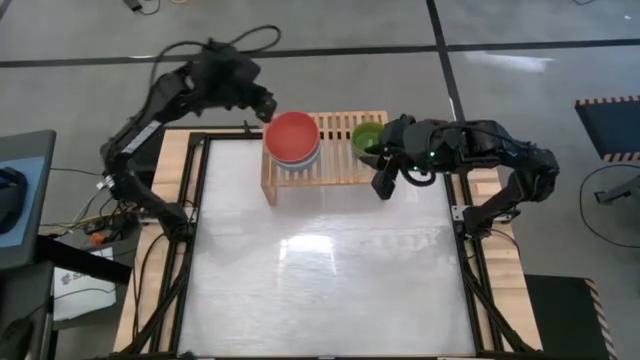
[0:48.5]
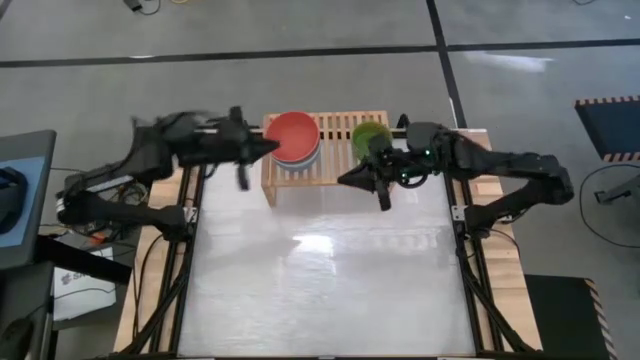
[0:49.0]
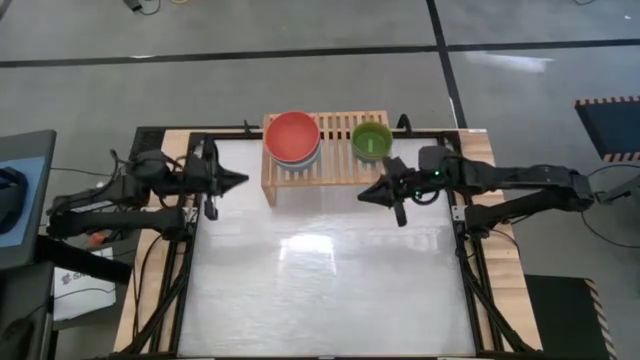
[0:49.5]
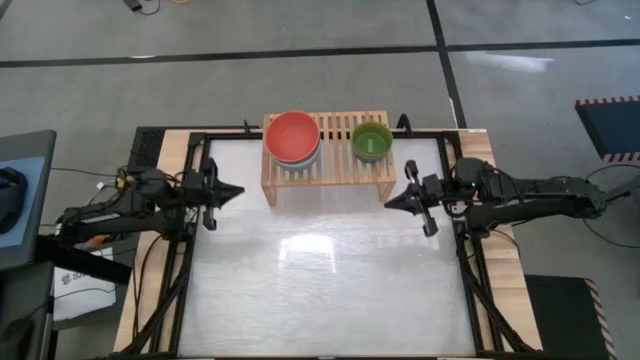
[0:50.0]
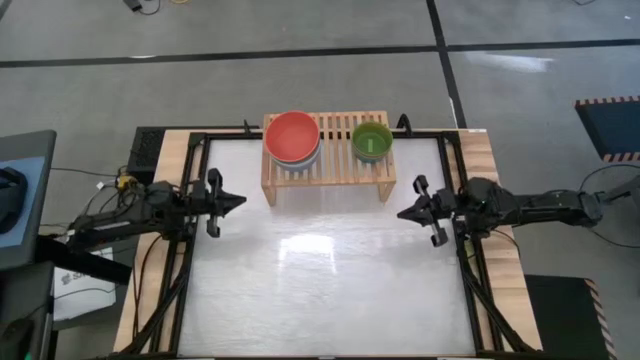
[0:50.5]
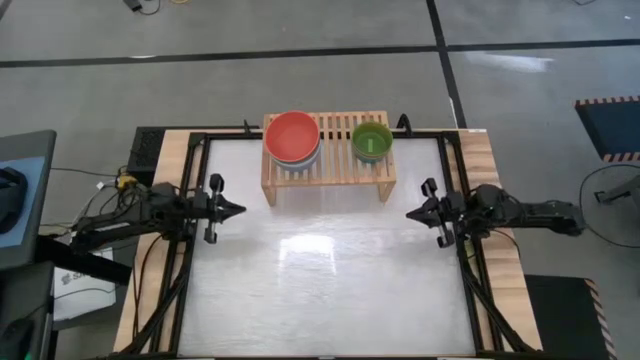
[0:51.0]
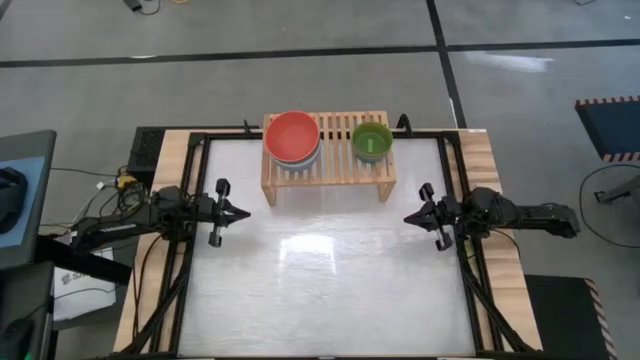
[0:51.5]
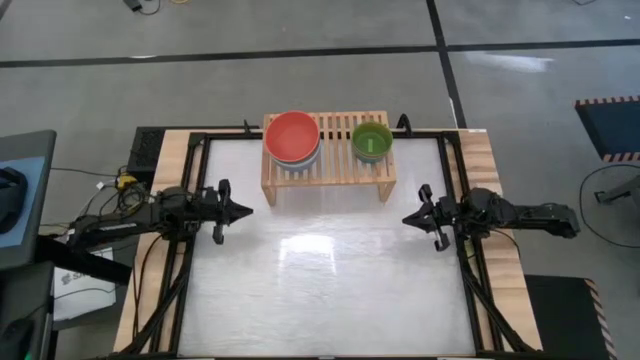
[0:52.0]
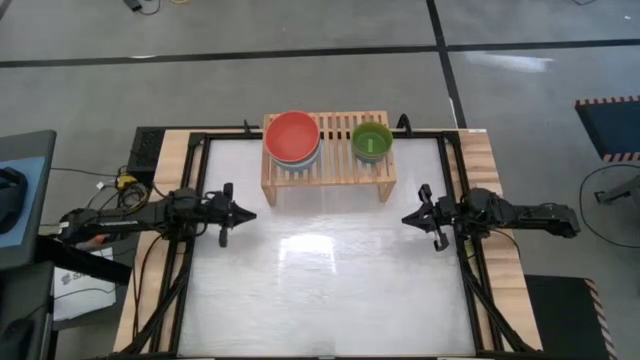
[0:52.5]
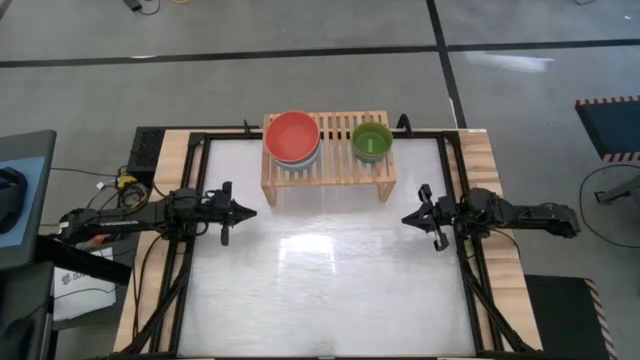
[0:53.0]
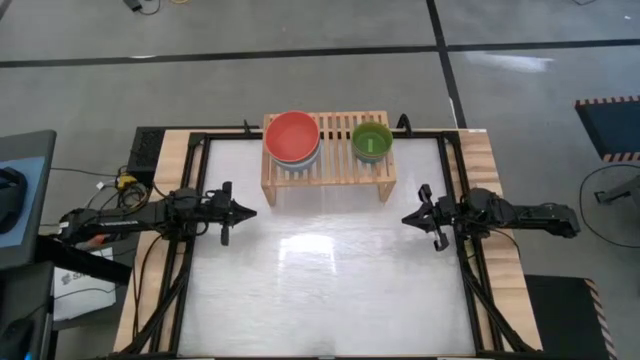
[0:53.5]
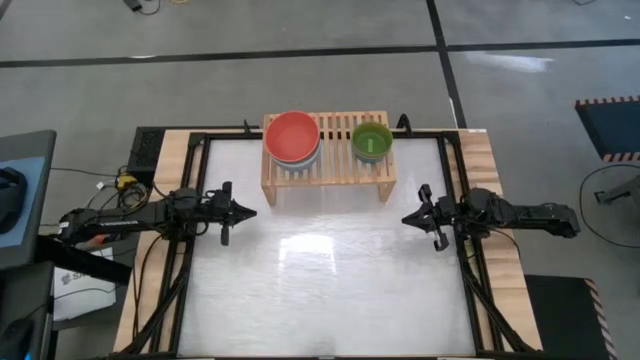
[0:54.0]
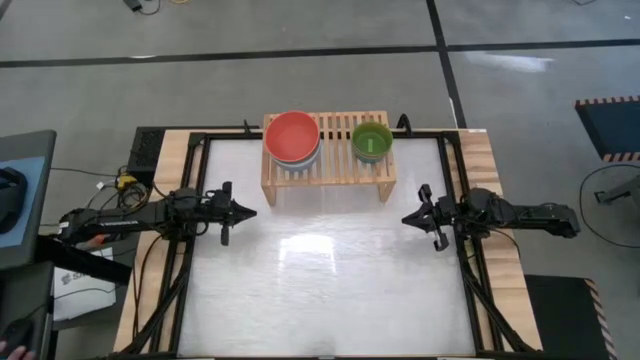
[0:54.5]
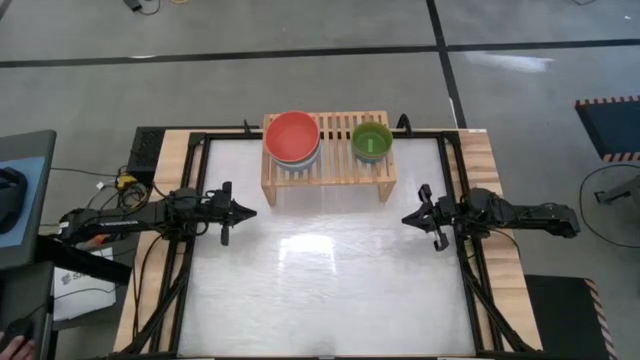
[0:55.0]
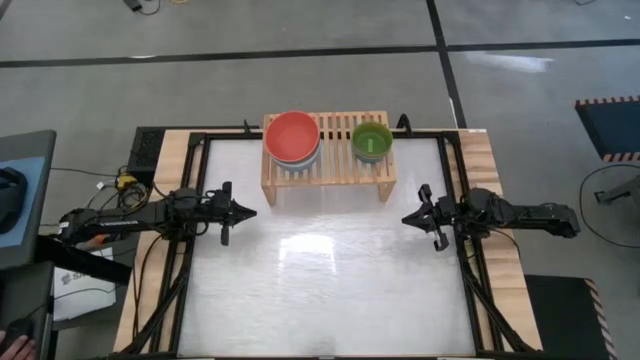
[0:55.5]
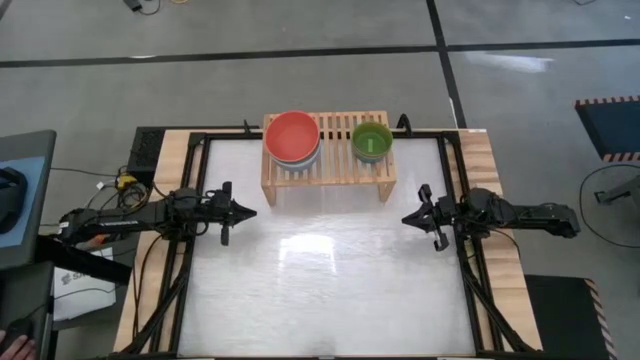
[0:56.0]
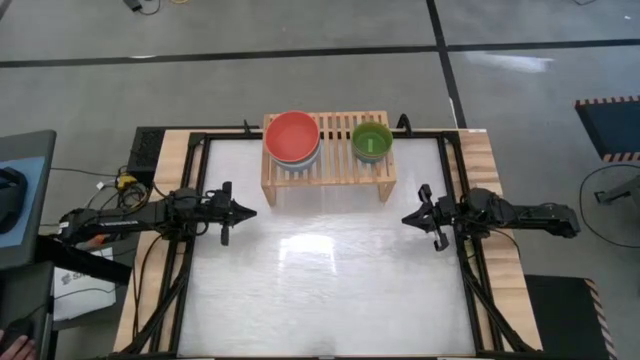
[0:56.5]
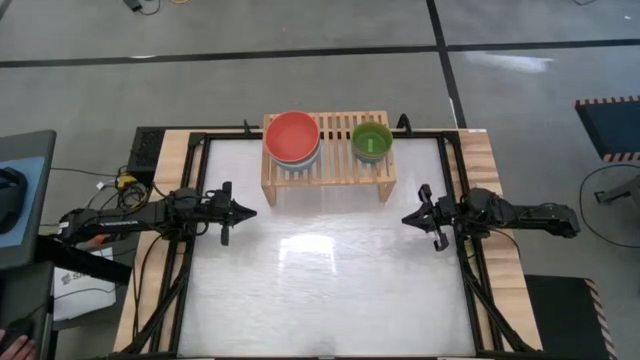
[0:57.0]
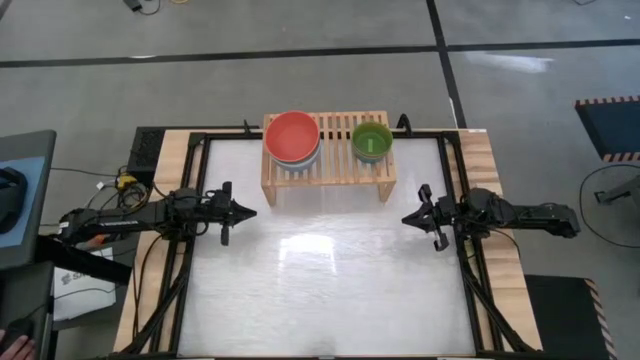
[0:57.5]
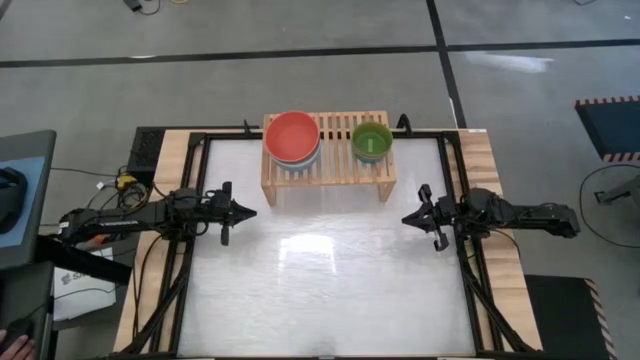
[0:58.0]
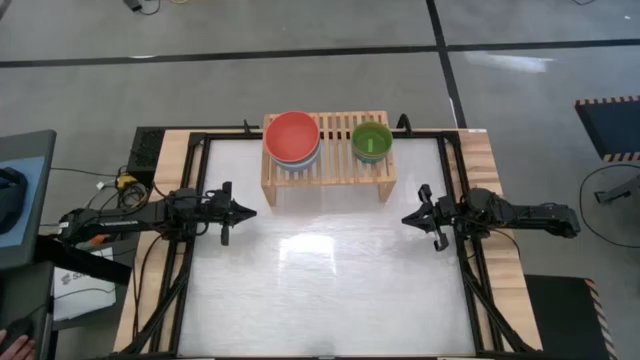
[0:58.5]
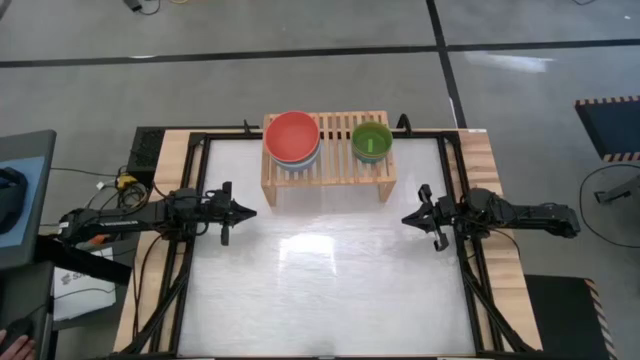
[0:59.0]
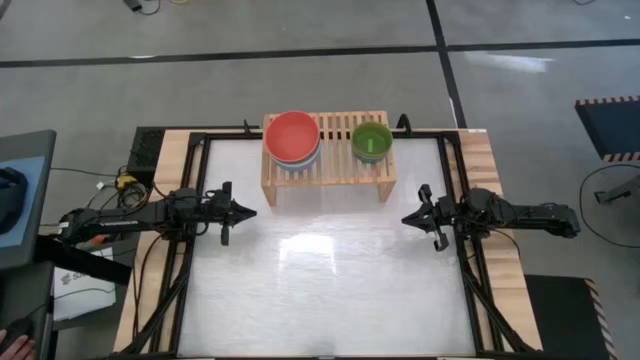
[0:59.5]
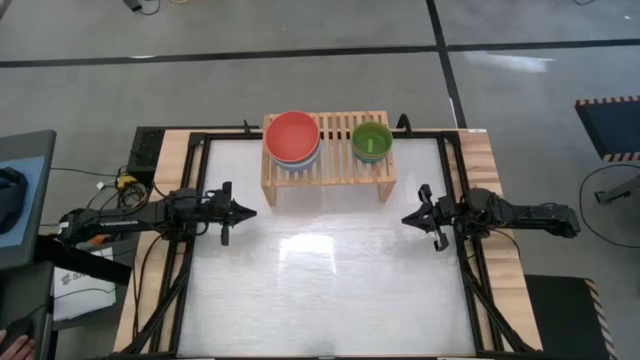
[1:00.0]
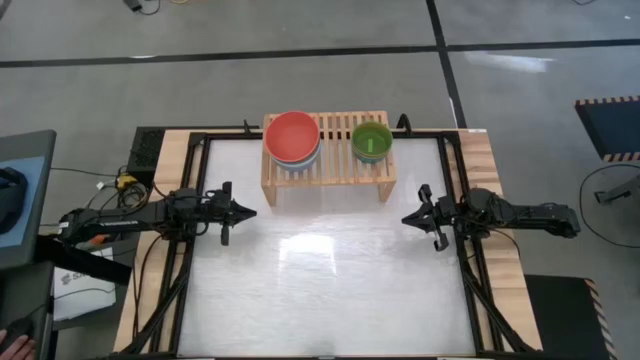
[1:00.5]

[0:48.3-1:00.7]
Task: Place and stack bowls onto a shelf
Return to Home Position

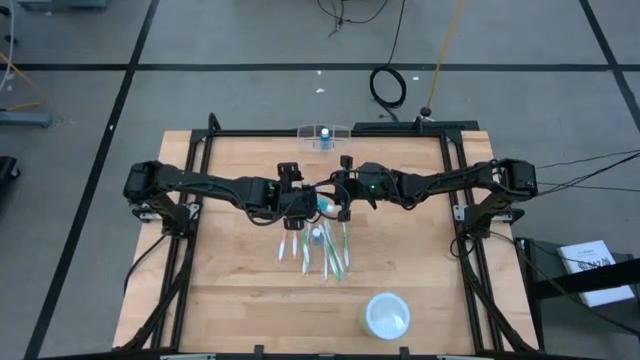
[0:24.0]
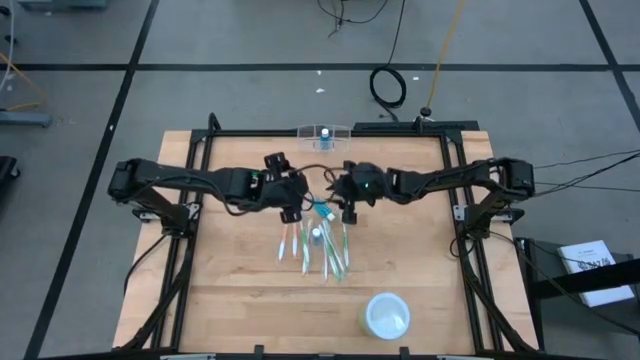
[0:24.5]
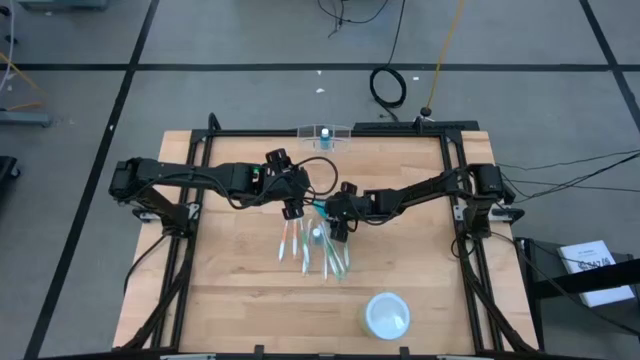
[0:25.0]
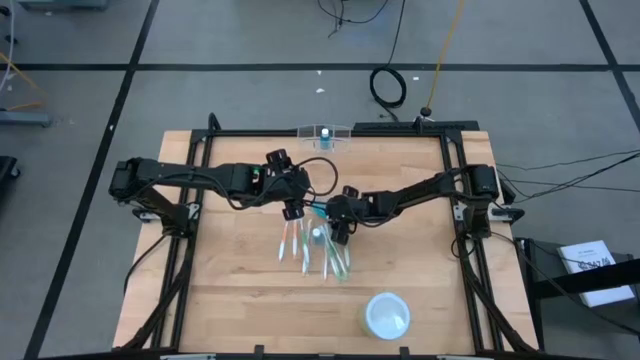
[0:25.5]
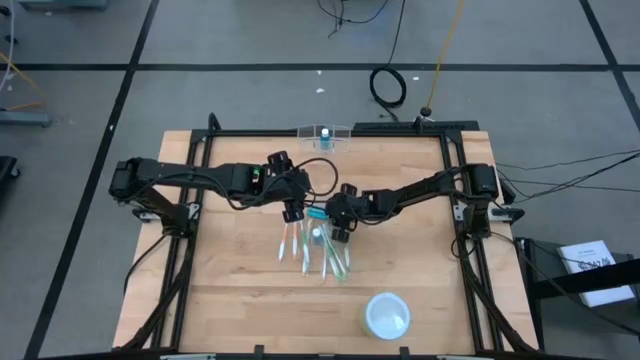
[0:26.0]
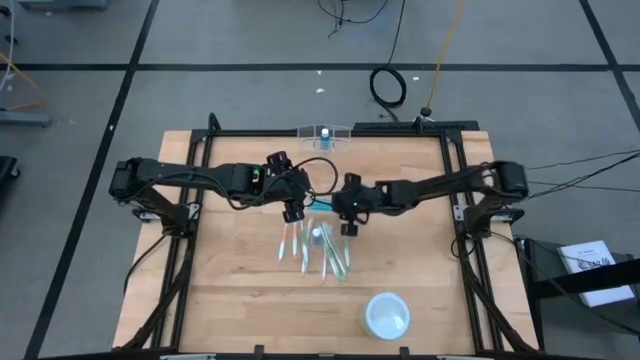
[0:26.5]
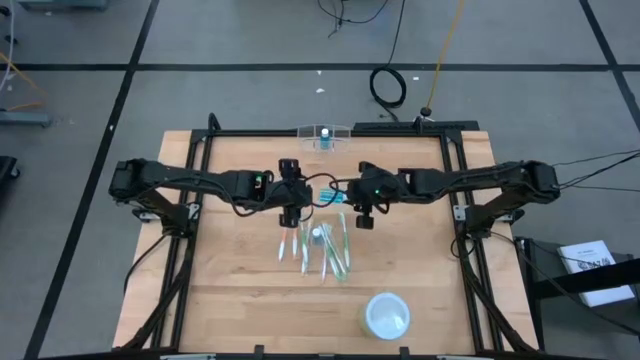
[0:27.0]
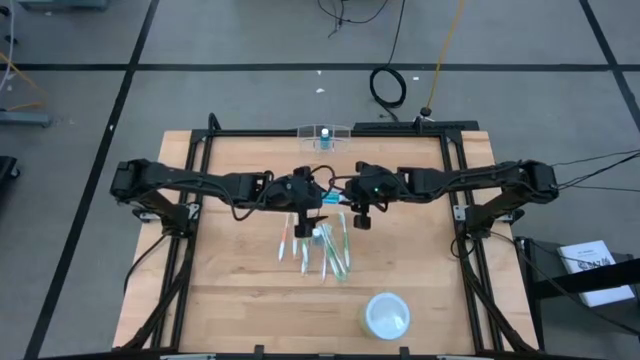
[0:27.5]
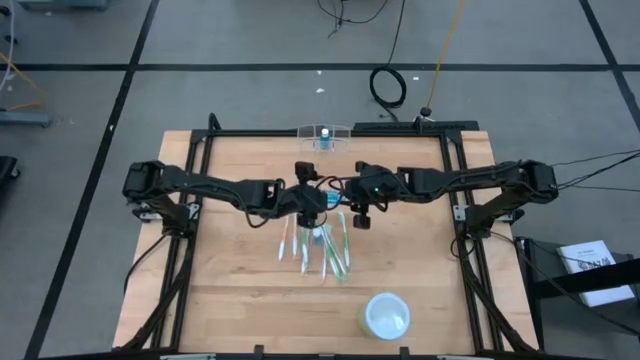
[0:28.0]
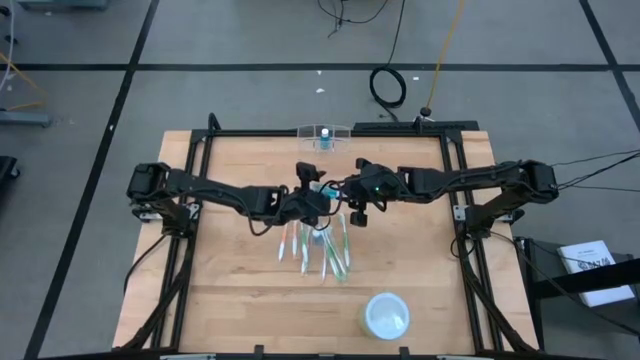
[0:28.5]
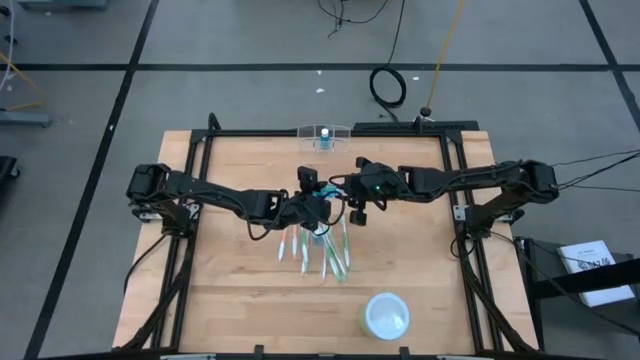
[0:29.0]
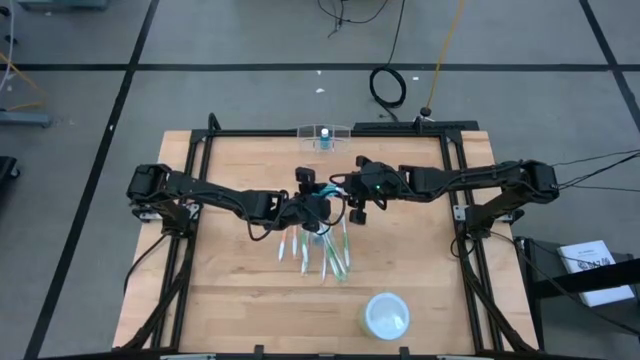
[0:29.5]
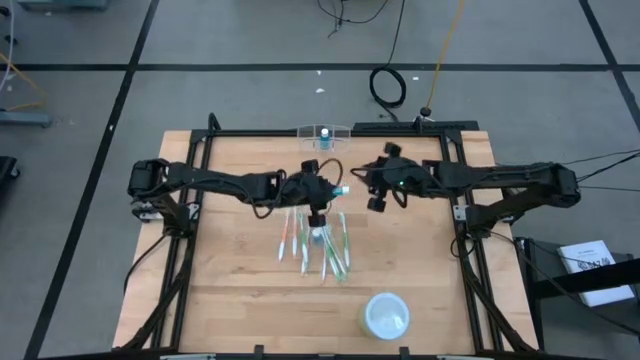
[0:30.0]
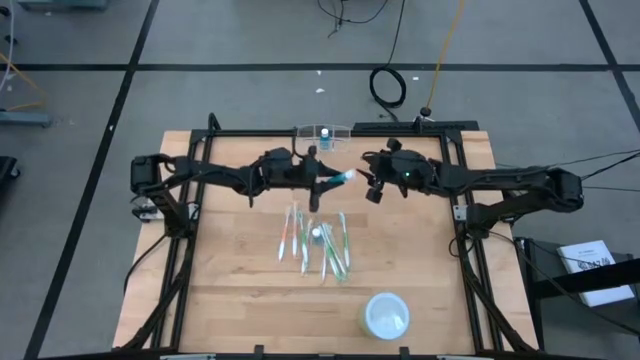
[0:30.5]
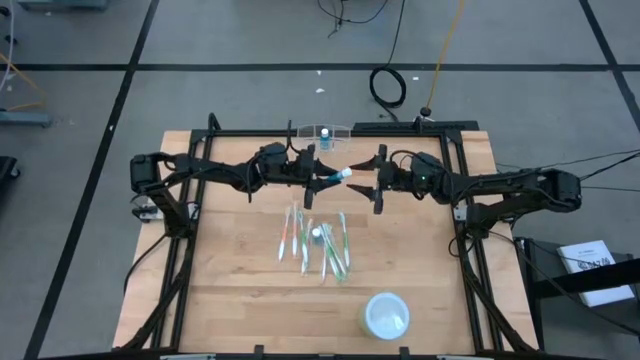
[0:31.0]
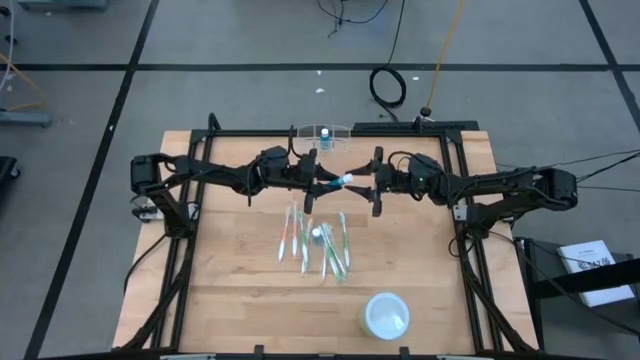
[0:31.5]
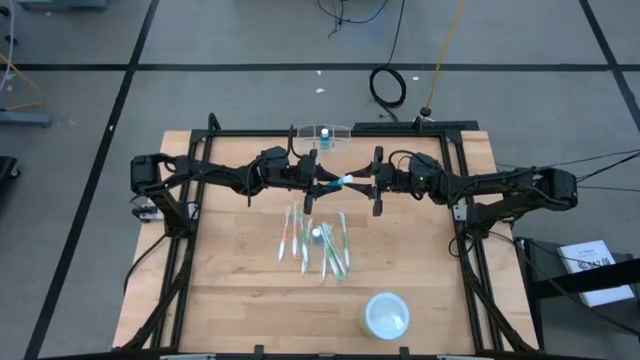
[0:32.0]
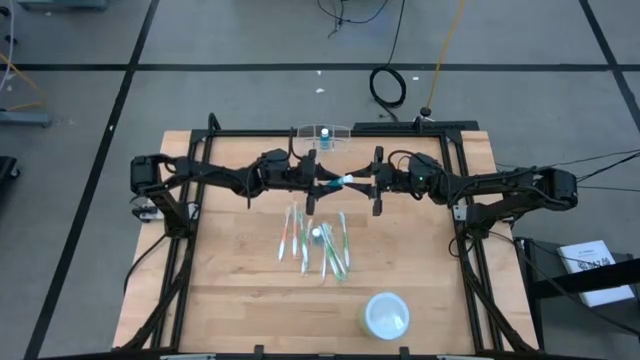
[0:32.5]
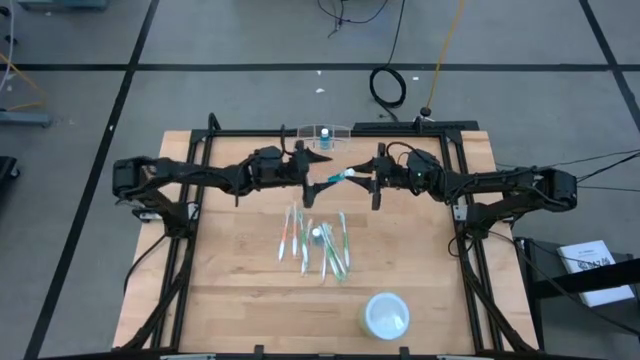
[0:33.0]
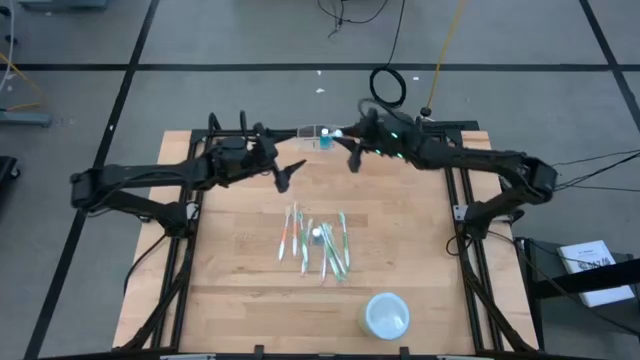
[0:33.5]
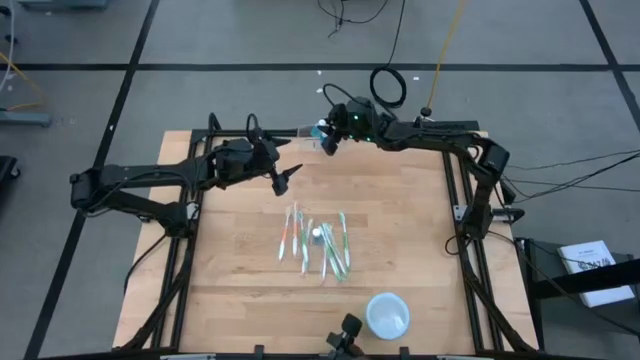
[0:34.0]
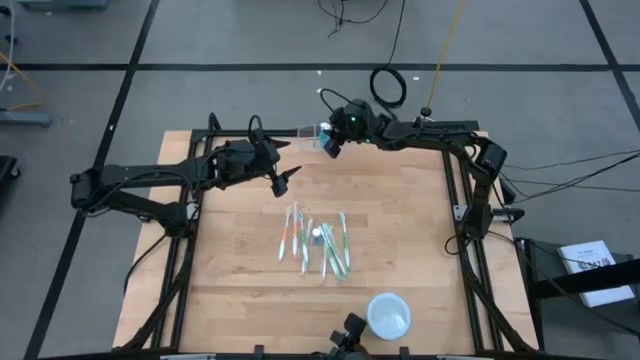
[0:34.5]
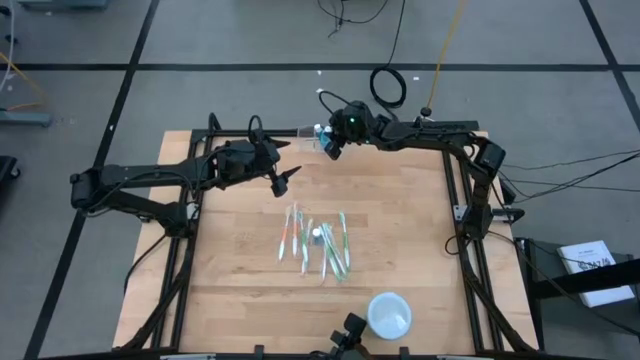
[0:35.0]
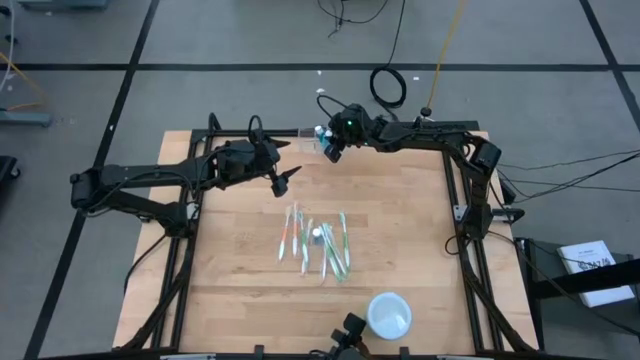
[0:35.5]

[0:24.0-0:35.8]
Task: Pick & Place toothbrushing station
Put the blue mouthwash into the transparent organizer
